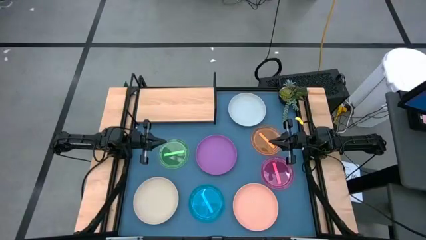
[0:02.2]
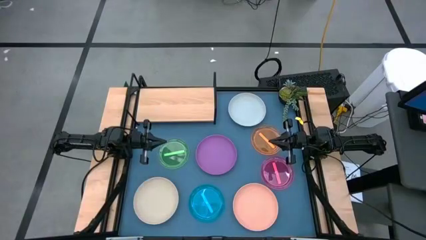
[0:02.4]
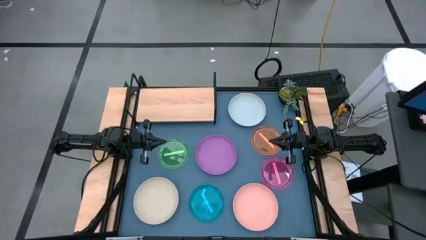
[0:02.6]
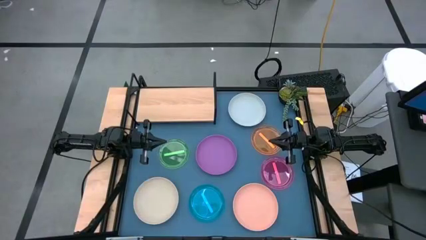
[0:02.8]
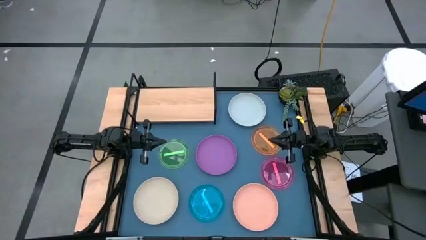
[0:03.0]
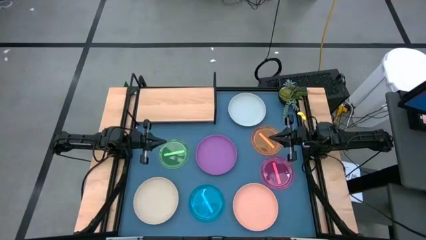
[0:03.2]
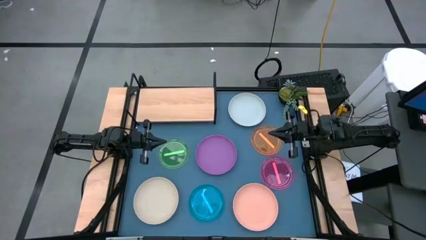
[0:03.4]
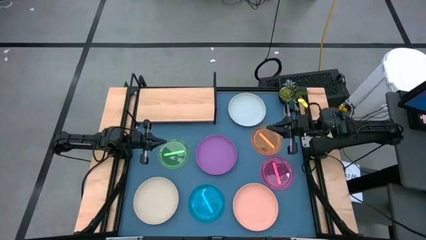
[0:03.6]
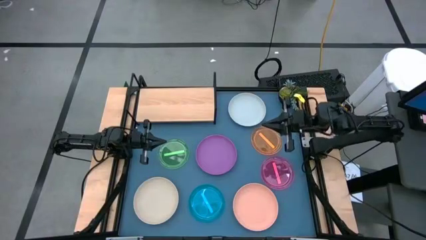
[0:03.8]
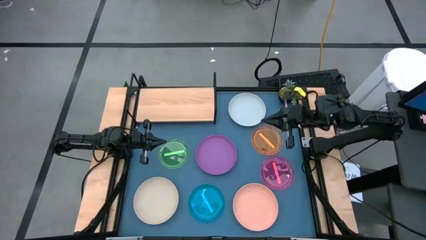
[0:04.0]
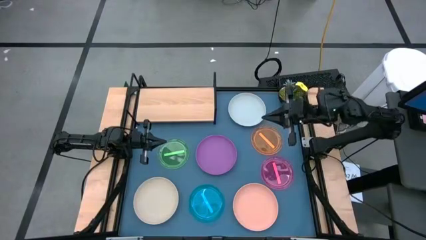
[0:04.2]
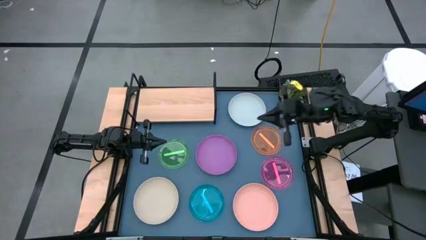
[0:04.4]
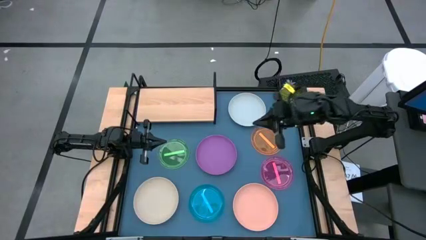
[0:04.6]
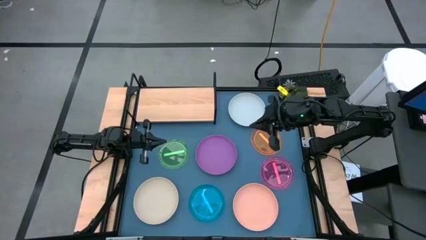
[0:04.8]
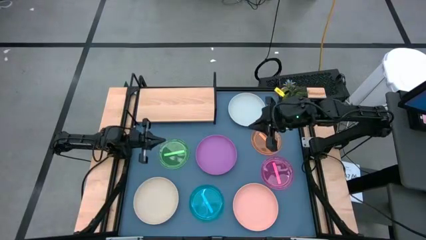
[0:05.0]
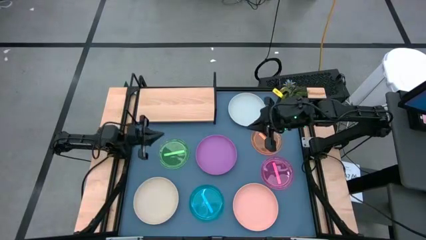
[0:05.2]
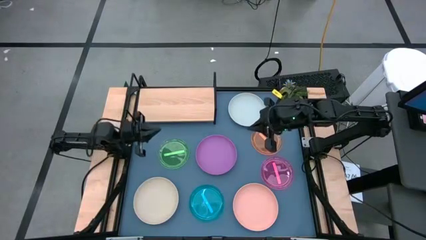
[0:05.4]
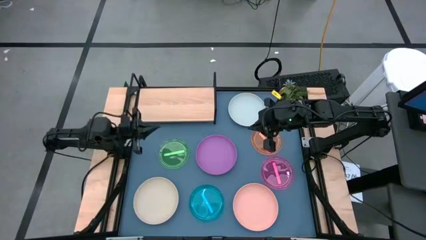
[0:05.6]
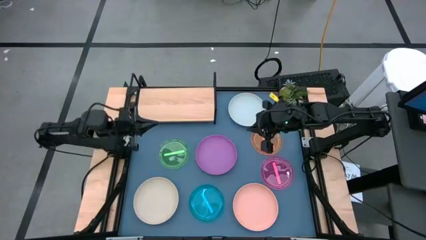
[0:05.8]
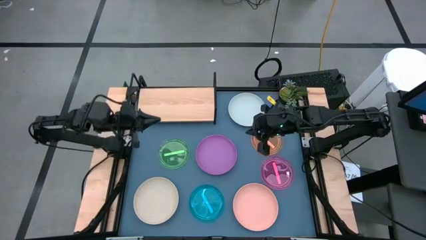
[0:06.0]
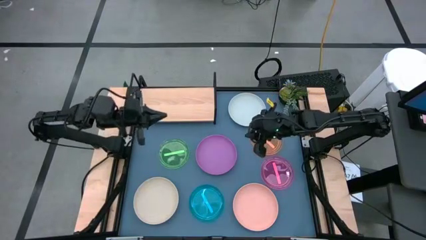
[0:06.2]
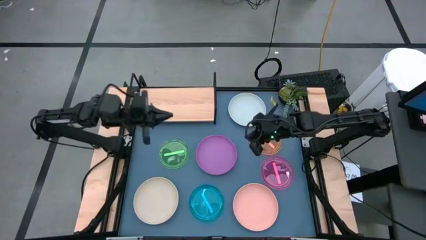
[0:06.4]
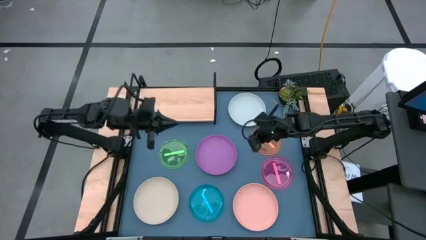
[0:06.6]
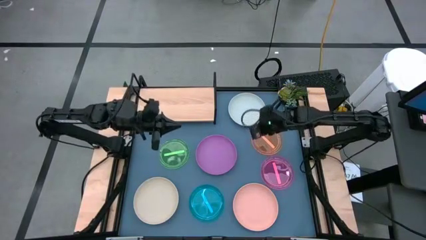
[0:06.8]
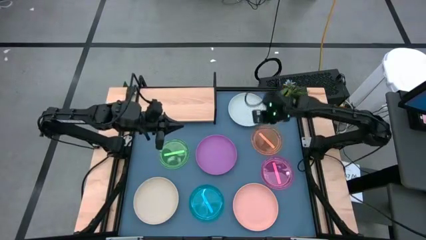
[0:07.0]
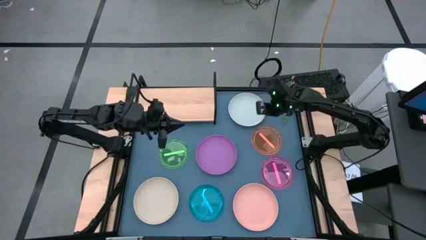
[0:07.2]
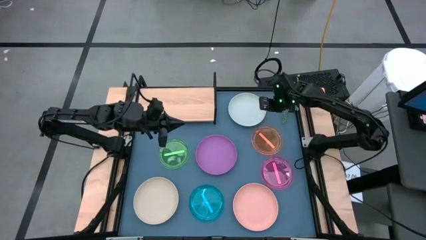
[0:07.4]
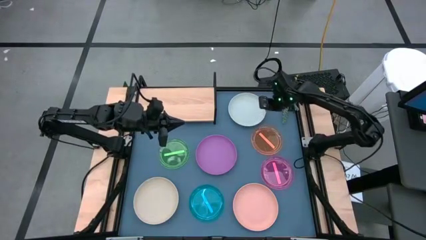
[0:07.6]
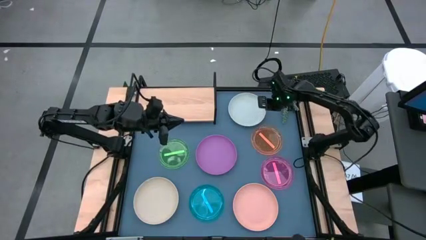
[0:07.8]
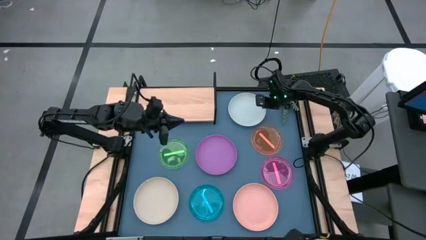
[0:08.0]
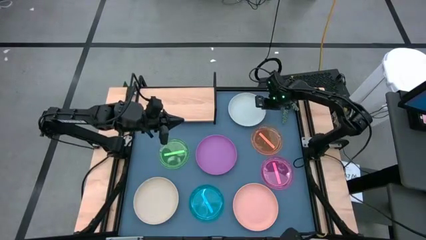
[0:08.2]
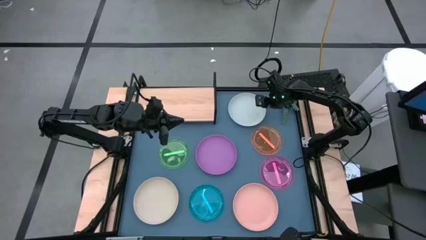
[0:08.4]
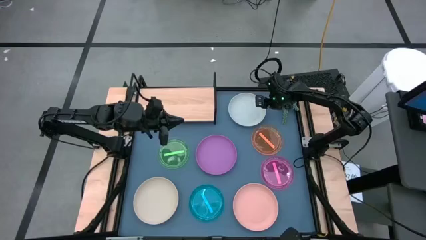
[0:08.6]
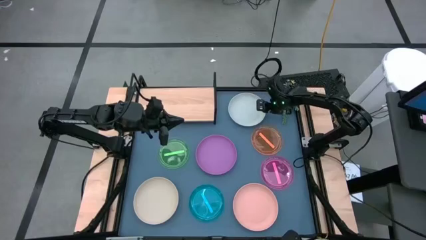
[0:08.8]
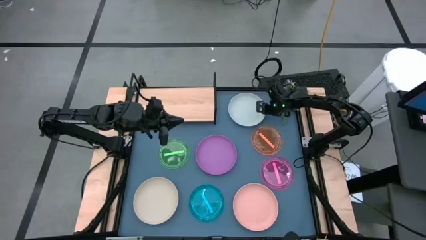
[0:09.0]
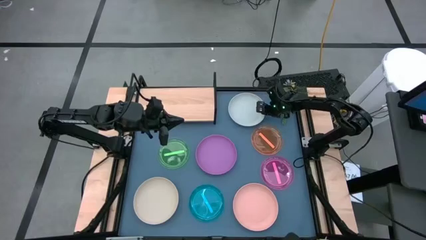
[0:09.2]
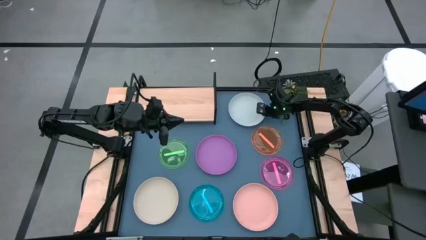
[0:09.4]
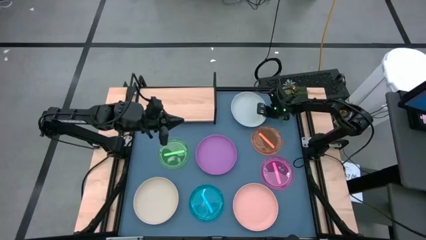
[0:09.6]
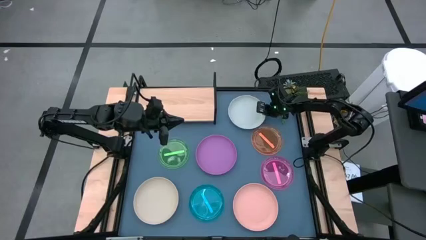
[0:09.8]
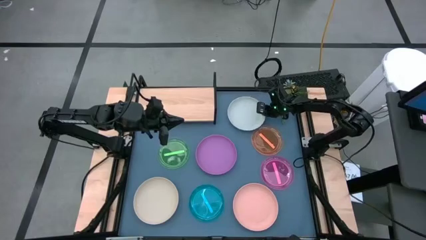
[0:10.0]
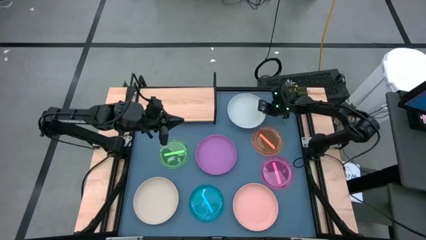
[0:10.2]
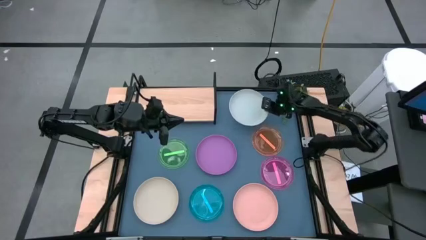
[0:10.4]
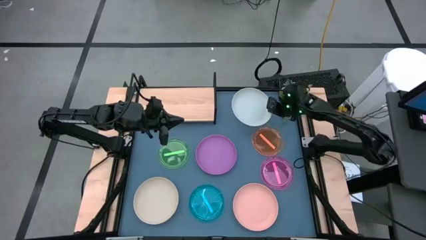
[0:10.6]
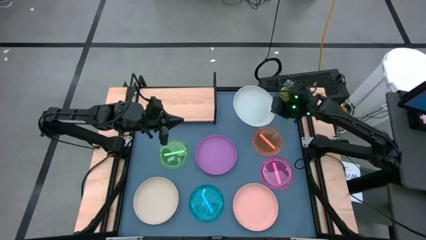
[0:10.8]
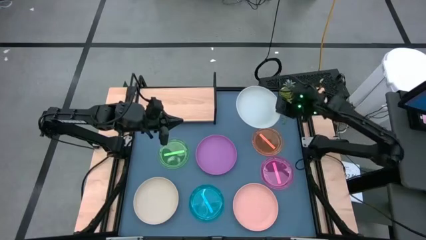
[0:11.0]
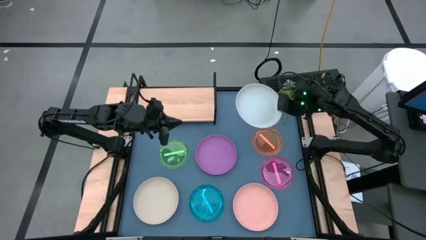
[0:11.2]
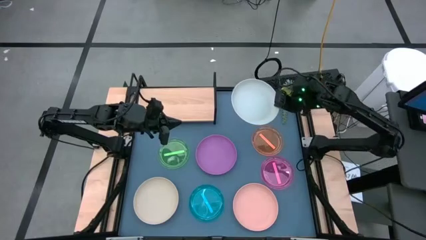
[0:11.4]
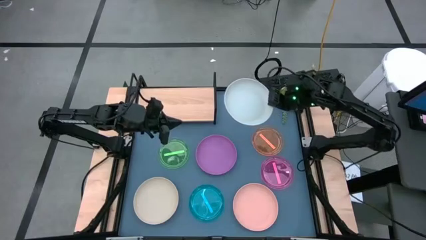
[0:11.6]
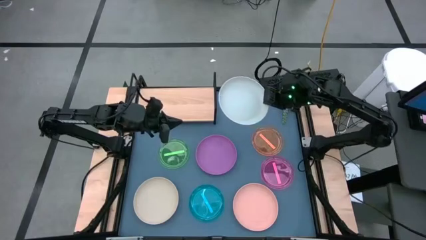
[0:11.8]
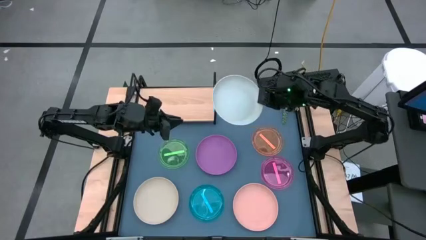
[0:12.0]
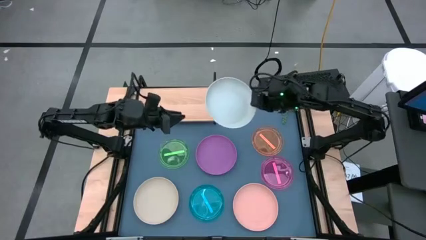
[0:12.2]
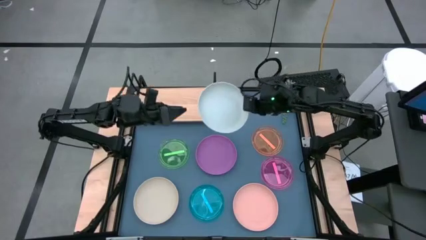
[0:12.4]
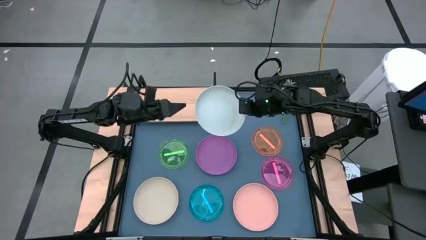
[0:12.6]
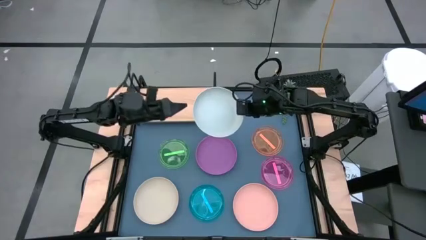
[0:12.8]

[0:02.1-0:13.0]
Task: Place and stack plates onto a shelf
Put the gray plate on the shelf

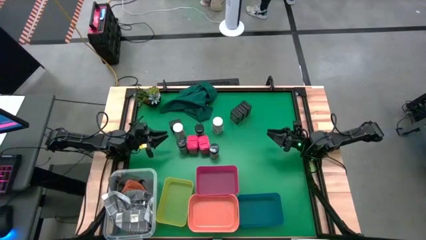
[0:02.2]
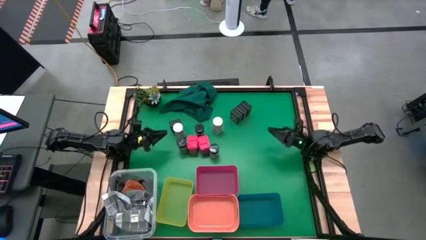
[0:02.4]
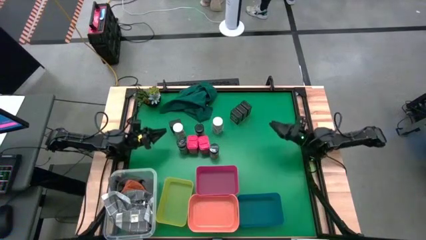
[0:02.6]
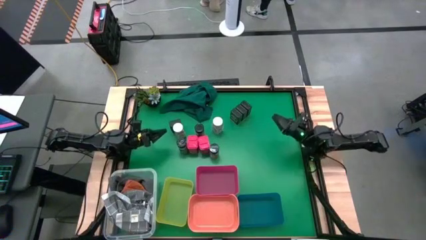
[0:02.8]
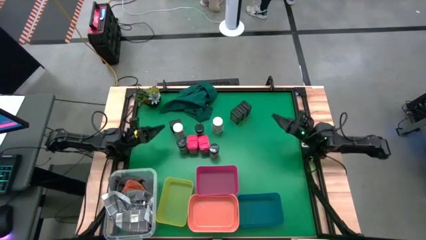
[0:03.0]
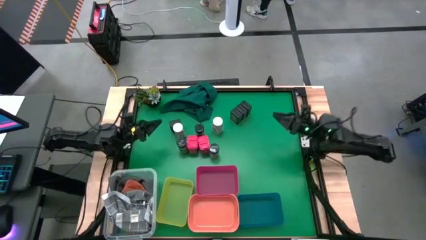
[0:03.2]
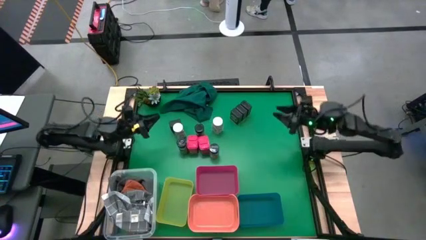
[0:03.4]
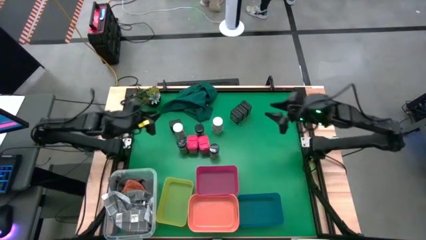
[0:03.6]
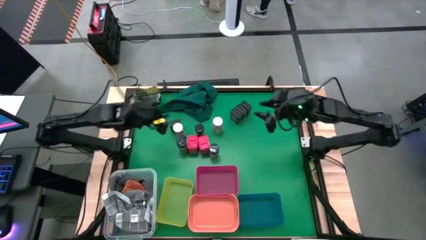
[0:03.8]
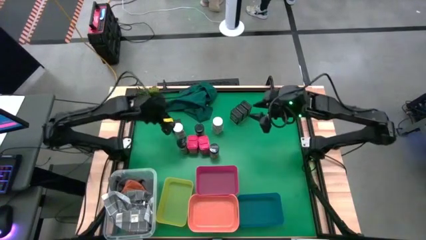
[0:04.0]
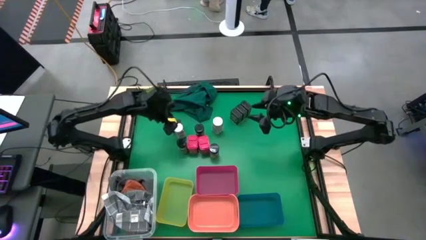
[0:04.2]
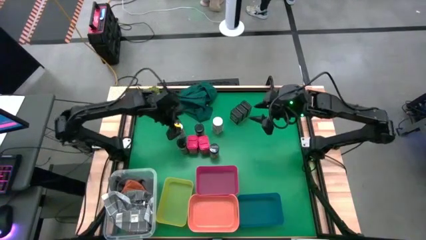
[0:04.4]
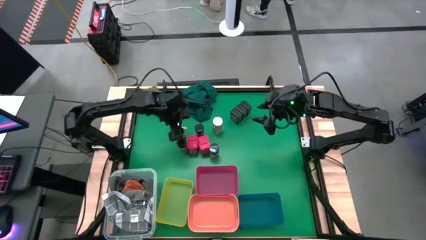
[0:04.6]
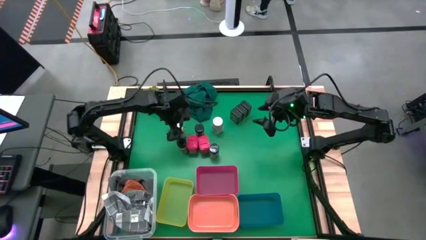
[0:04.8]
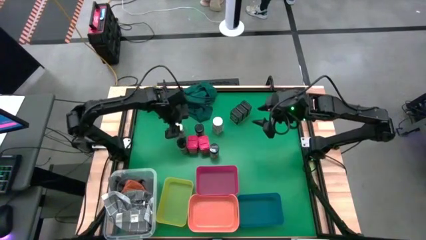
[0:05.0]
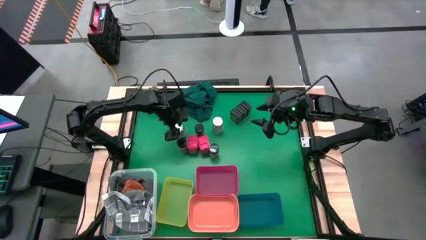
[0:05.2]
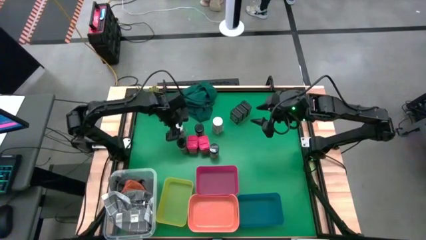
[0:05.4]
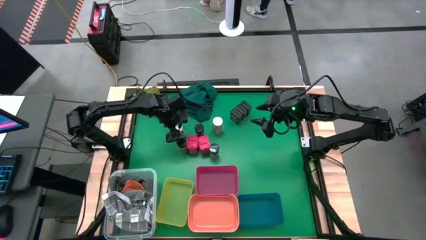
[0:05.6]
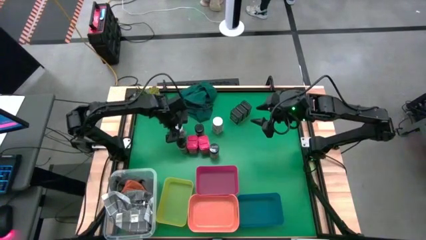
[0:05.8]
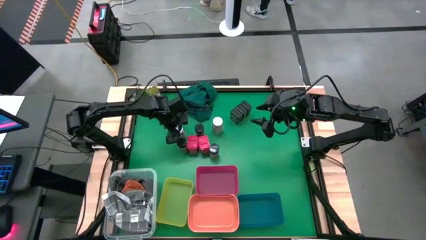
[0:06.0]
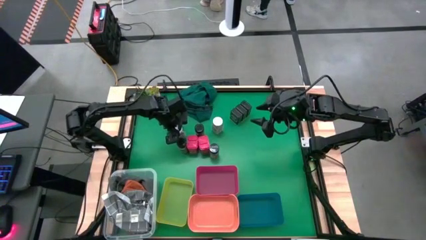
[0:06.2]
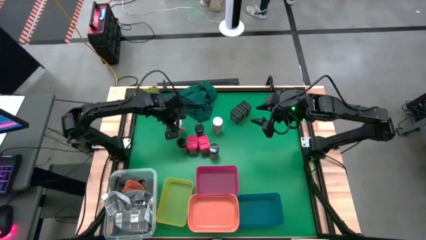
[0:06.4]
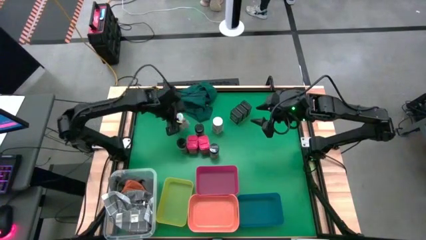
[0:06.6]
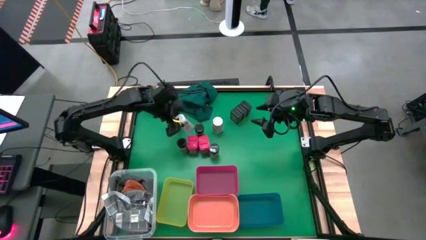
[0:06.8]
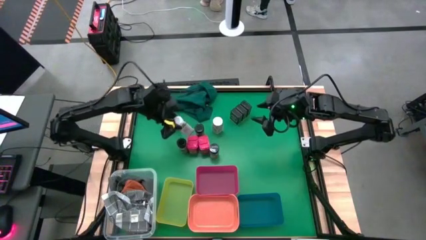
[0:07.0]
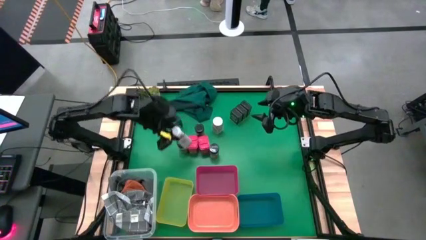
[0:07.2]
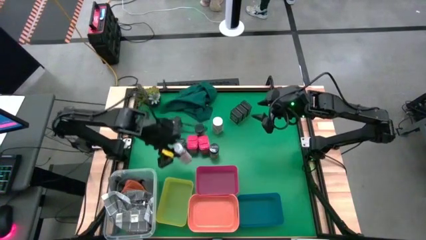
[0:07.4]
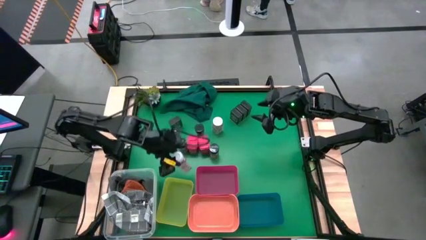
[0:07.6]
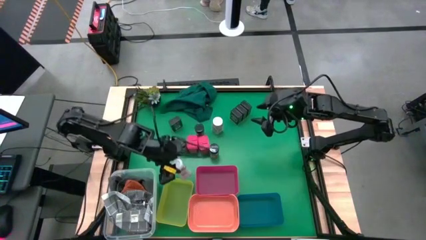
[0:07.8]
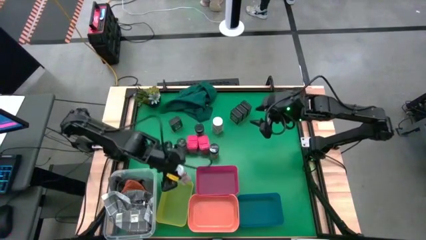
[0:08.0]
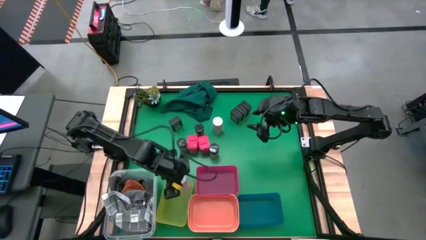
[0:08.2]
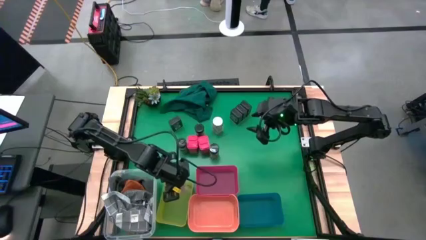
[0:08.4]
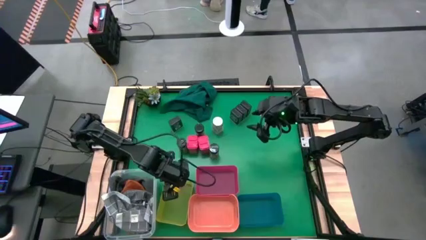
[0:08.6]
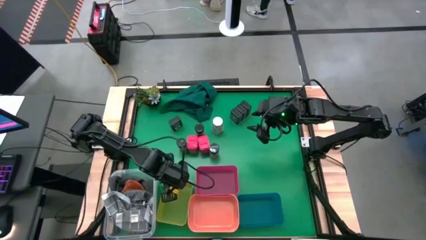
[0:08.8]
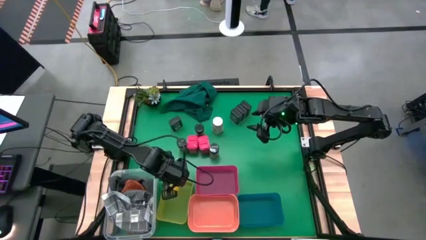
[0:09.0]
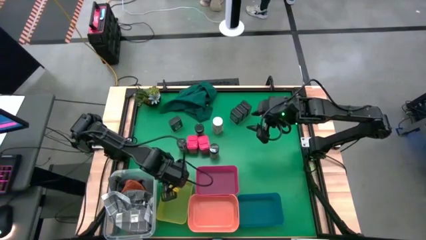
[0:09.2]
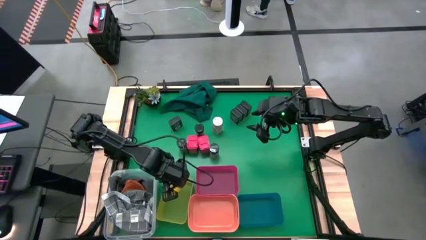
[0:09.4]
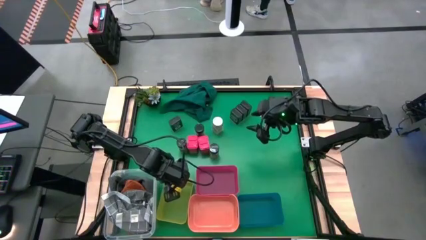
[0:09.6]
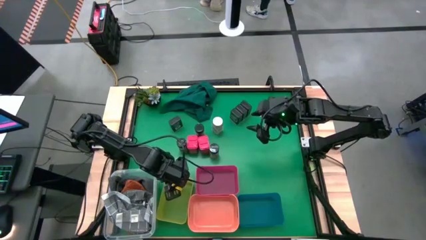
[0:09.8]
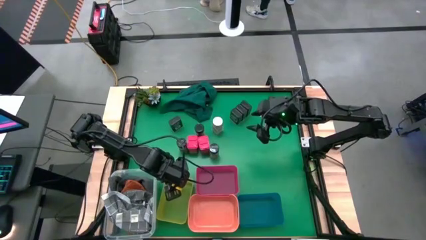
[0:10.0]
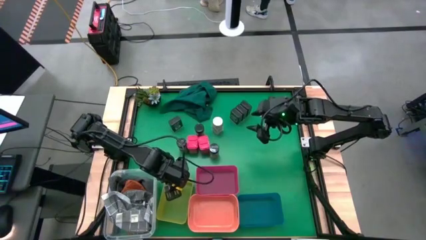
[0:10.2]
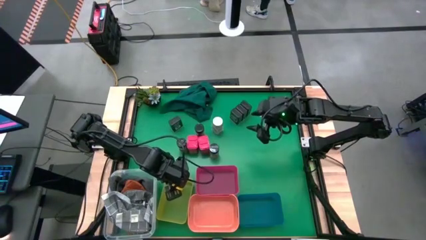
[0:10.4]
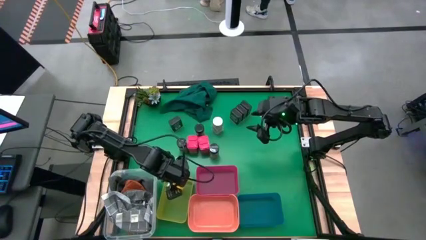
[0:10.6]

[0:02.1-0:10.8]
Task: Sort spices by type
Put the left white seasoning bottle into the yellow bin
